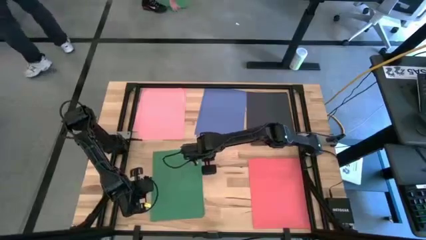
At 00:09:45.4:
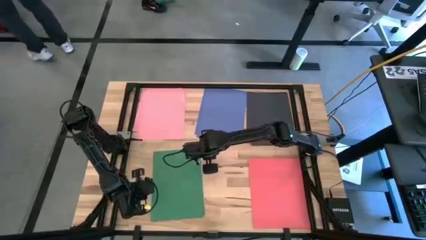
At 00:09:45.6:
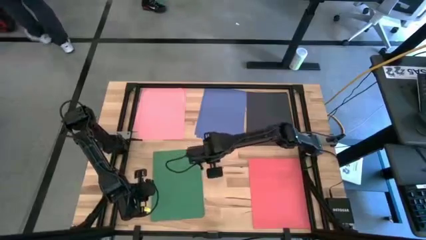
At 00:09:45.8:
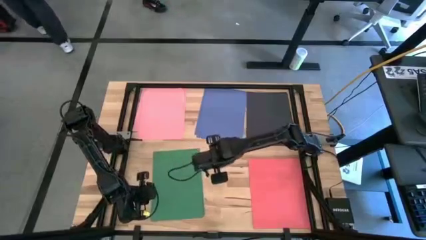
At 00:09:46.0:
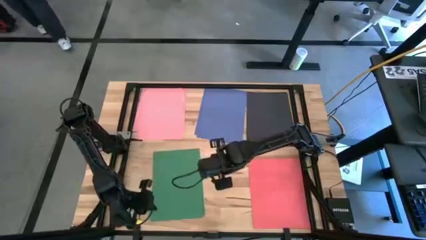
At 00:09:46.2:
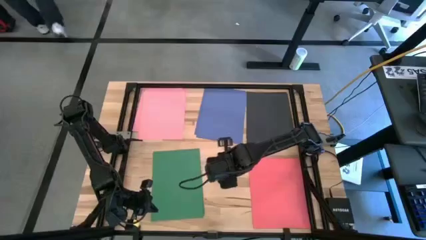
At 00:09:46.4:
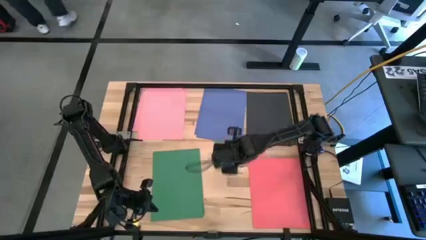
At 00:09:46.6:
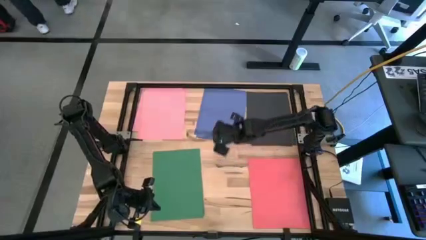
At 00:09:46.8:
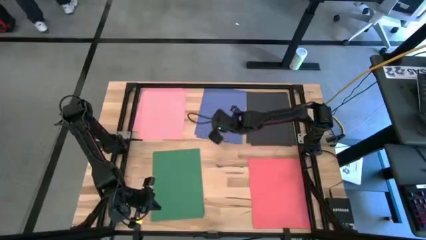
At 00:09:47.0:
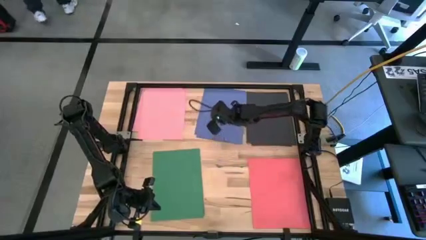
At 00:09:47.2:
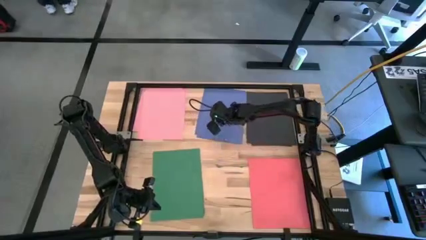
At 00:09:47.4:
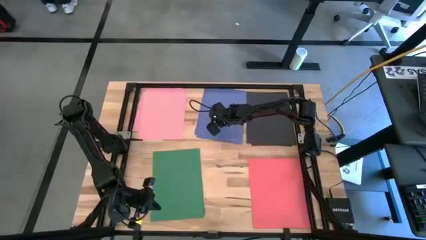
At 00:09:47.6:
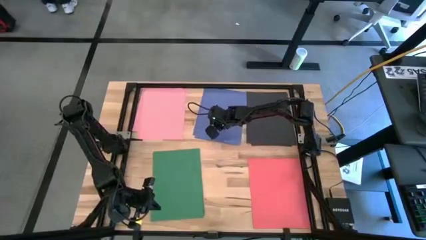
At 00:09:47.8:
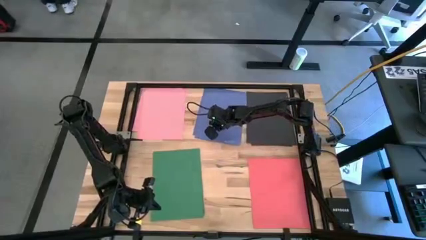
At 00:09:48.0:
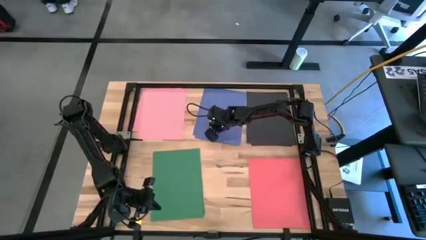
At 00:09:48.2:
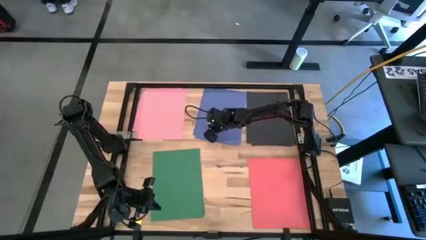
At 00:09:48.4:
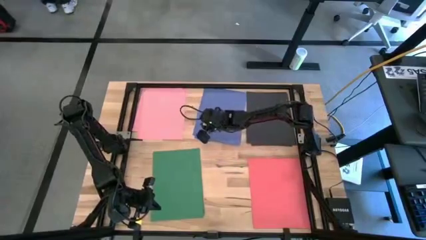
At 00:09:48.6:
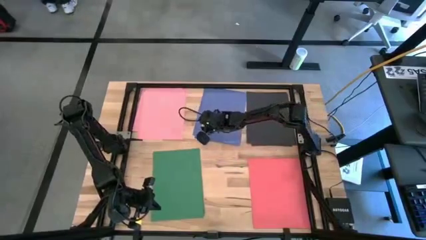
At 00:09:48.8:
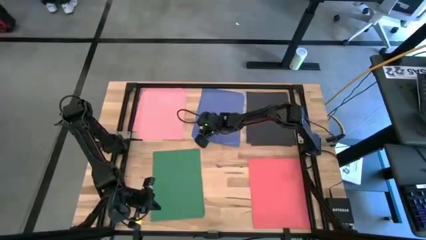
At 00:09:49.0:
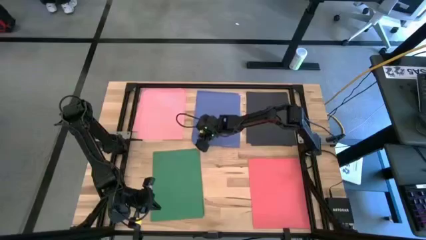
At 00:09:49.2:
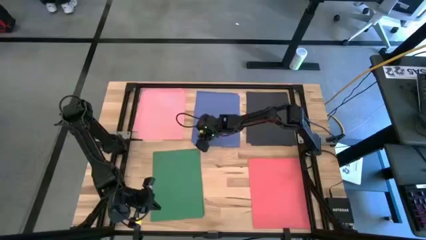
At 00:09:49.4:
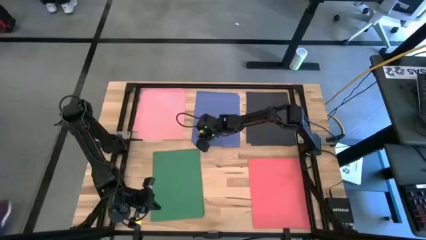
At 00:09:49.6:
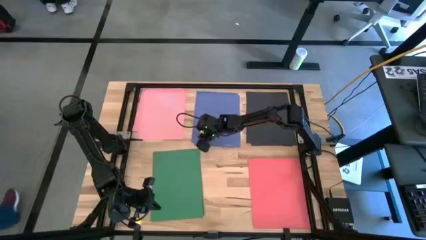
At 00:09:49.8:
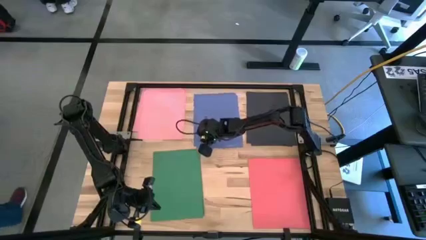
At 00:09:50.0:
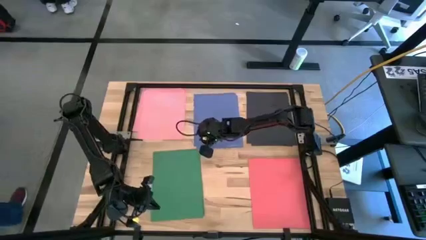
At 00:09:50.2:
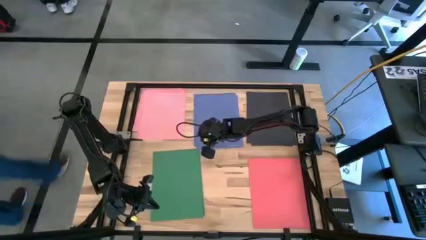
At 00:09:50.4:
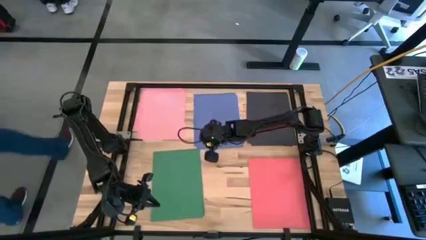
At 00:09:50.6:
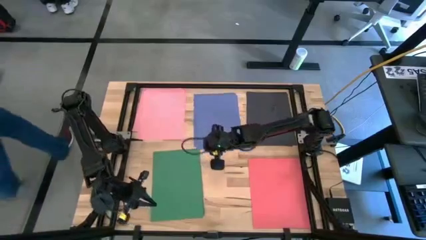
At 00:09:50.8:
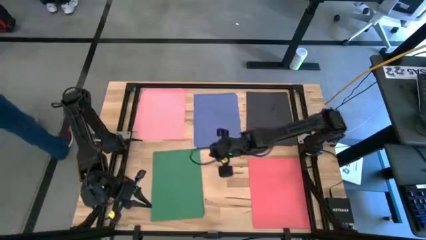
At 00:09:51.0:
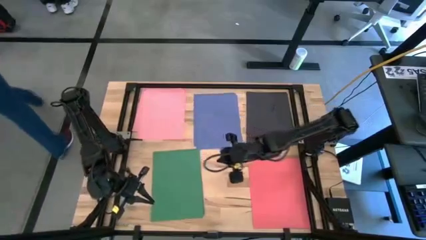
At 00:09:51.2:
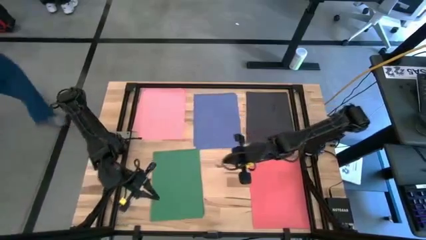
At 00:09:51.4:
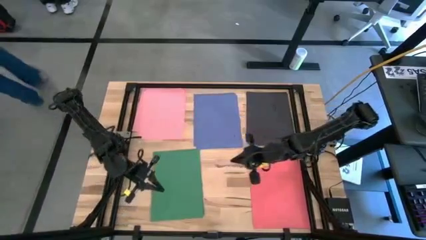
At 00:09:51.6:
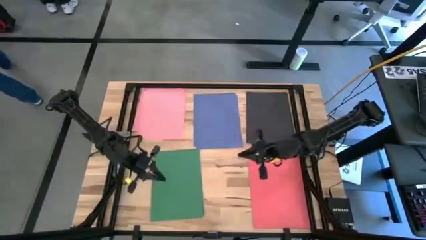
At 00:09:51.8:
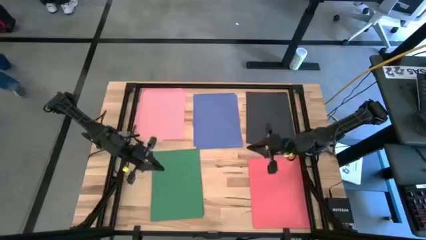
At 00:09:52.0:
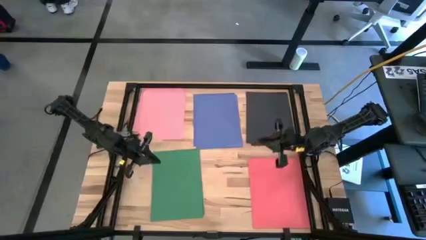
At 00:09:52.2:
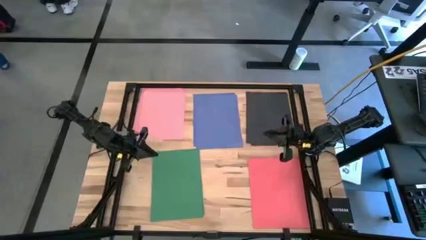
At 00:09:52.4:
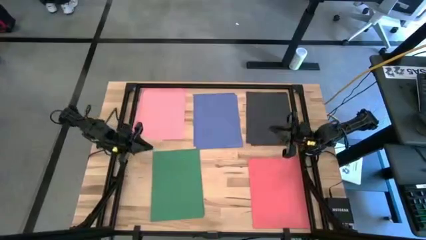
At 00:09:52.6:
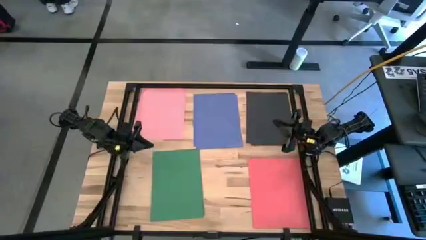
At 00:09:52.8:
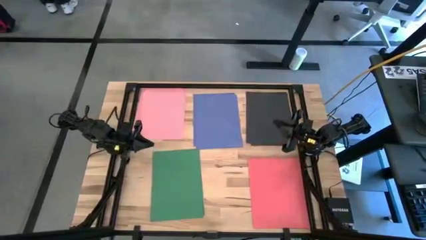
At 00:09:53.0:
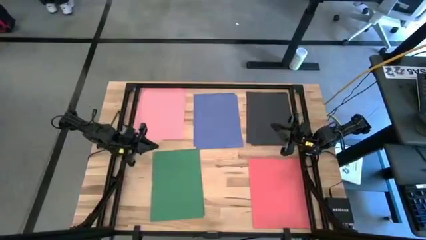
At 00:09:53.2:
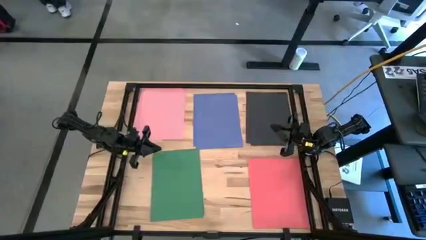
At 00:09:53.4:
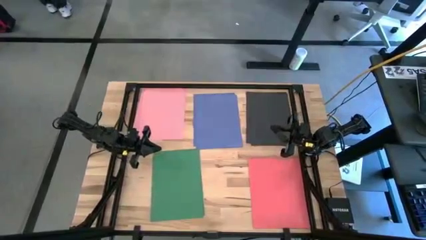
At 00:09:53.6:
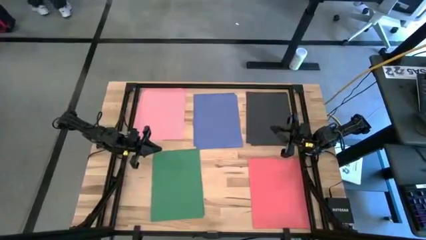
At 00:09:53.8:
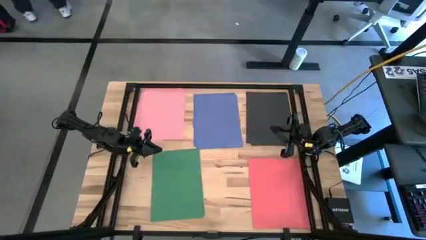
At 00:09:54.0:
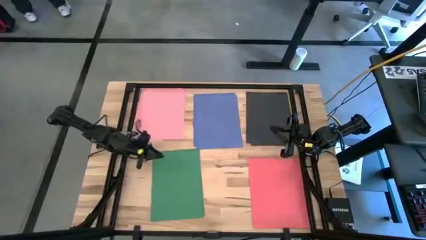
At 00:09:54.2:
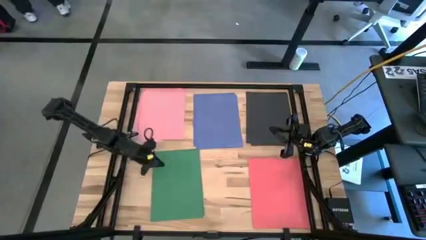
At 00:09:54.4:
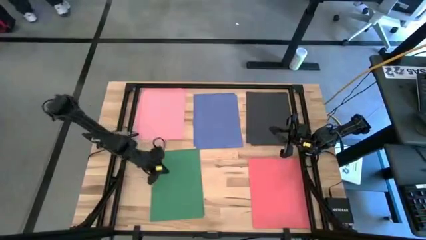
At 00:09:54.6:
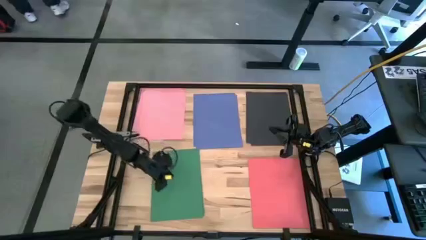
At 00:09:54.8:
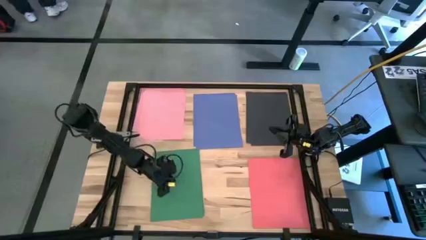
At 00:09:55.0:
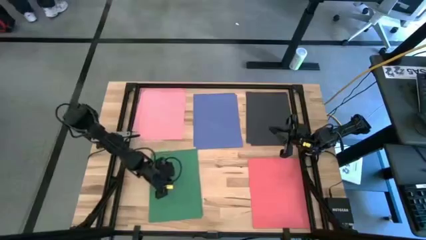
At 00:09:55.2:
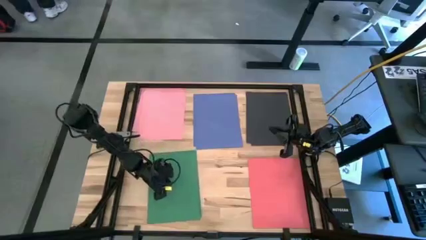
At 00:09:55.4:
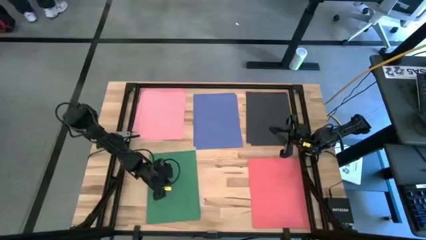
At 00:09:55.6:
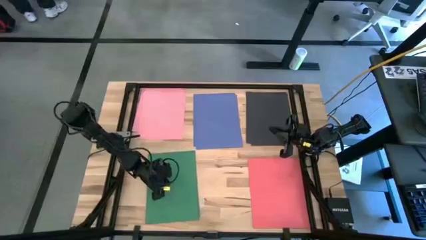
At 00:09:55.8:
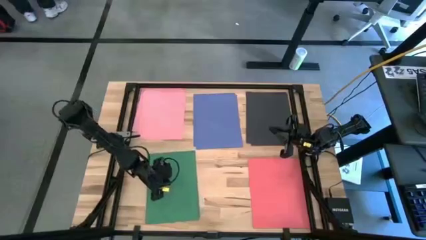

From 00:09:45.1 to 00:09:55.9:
Task: Organize paper
Adjust the papers on the table

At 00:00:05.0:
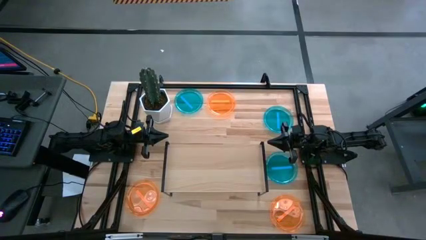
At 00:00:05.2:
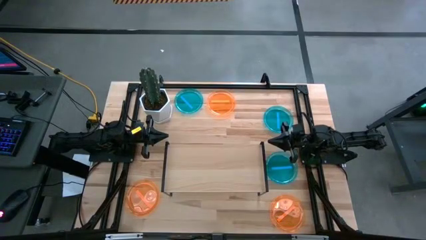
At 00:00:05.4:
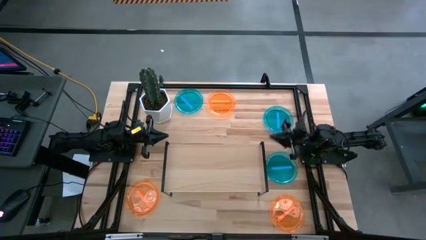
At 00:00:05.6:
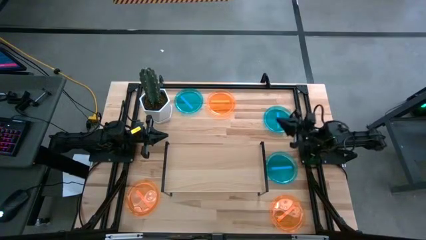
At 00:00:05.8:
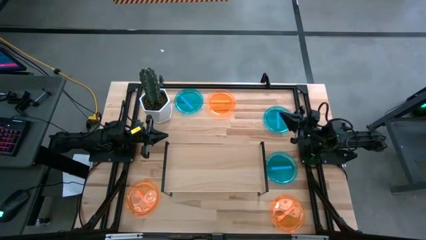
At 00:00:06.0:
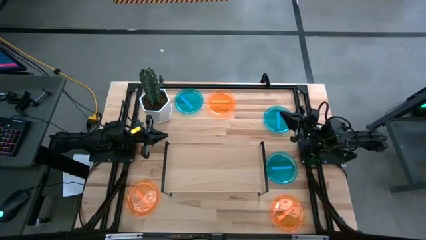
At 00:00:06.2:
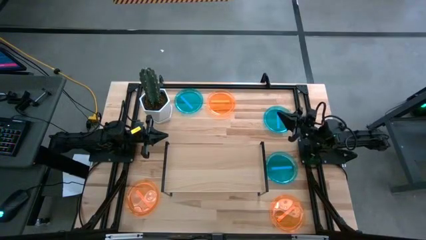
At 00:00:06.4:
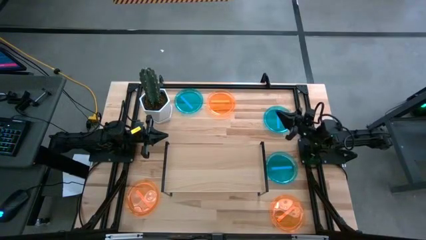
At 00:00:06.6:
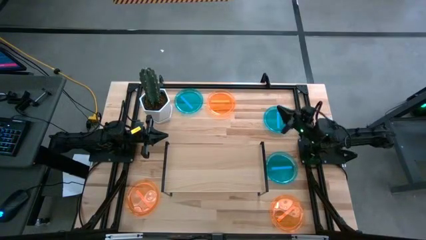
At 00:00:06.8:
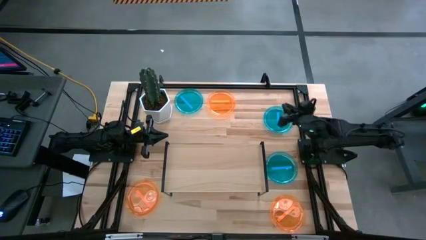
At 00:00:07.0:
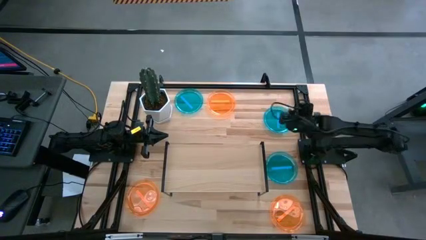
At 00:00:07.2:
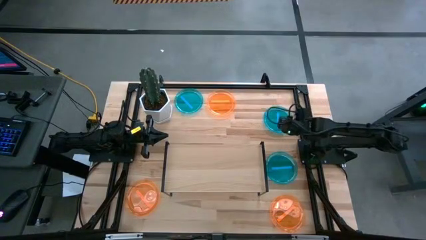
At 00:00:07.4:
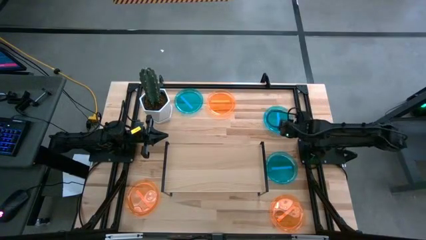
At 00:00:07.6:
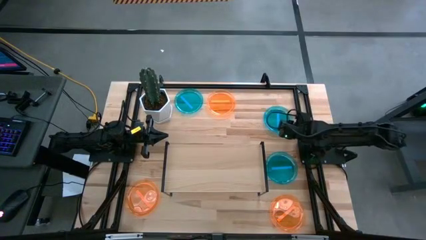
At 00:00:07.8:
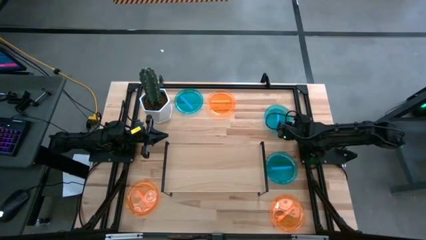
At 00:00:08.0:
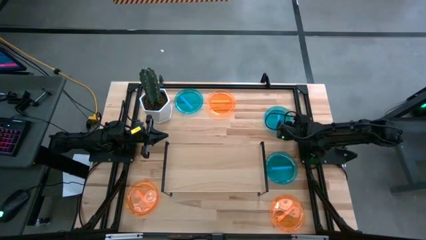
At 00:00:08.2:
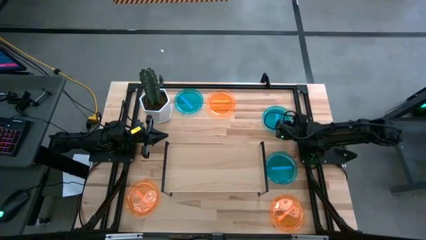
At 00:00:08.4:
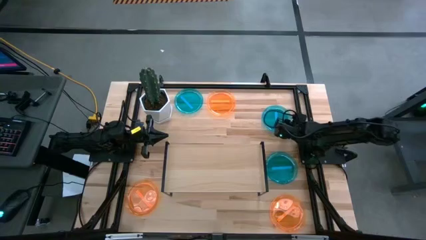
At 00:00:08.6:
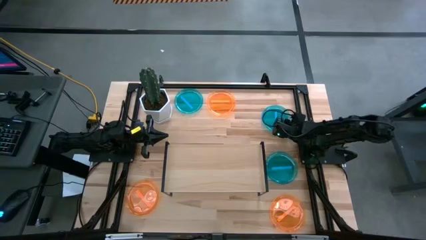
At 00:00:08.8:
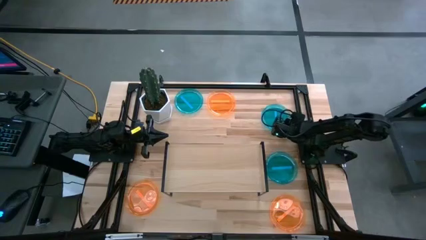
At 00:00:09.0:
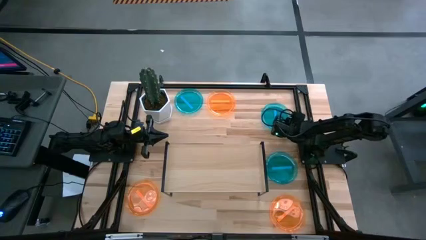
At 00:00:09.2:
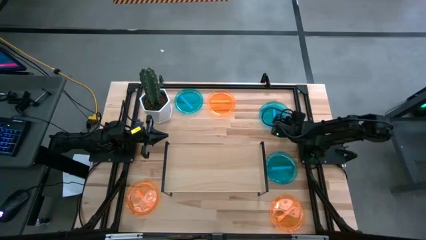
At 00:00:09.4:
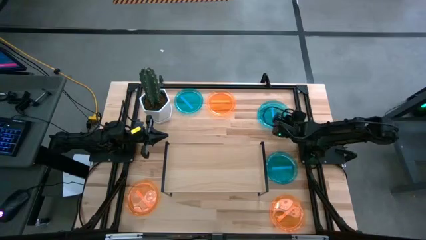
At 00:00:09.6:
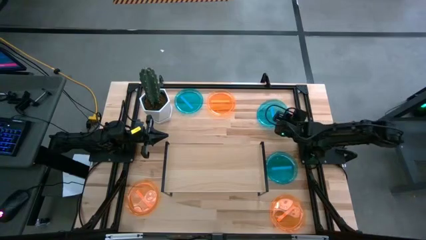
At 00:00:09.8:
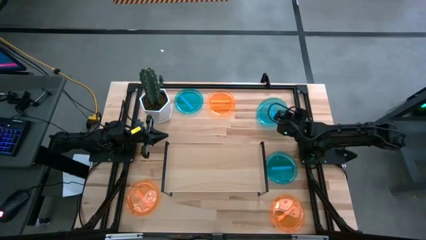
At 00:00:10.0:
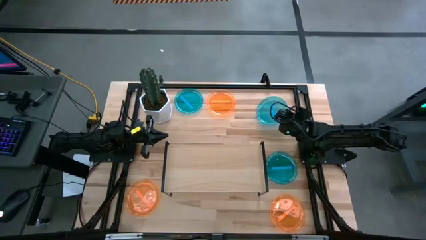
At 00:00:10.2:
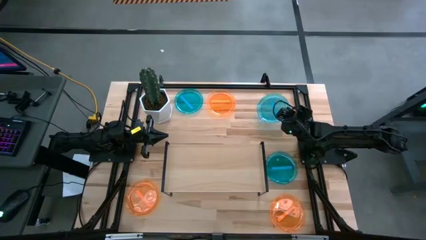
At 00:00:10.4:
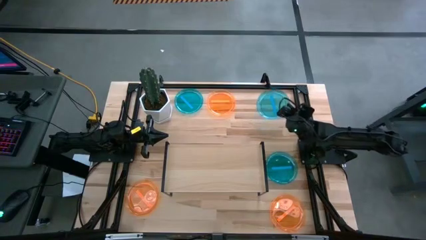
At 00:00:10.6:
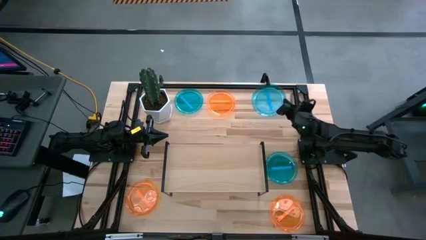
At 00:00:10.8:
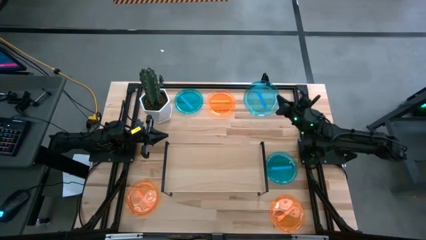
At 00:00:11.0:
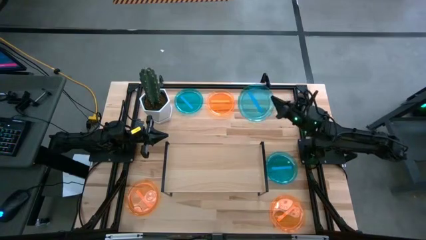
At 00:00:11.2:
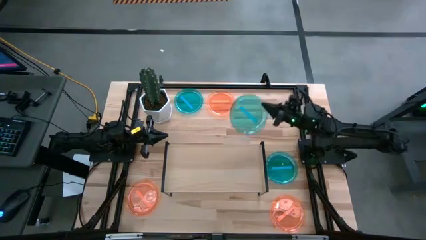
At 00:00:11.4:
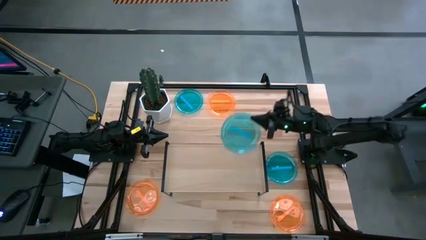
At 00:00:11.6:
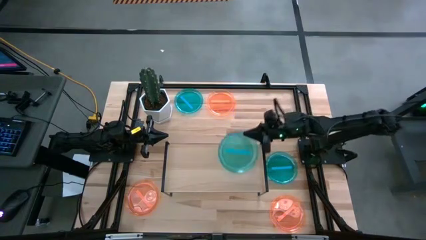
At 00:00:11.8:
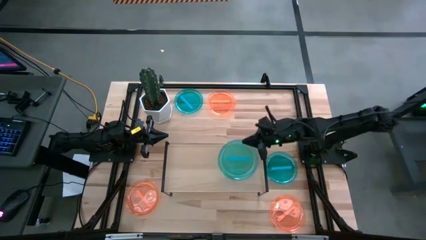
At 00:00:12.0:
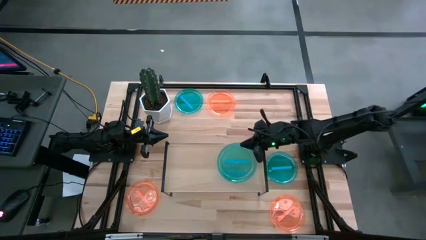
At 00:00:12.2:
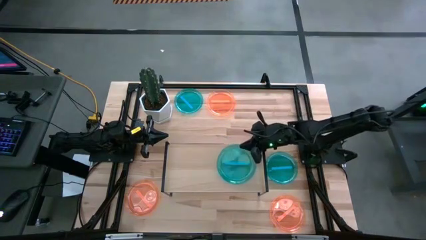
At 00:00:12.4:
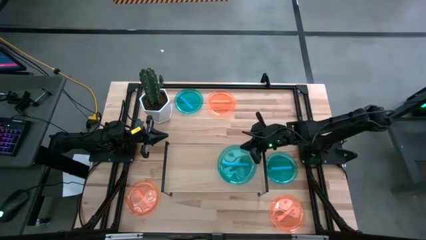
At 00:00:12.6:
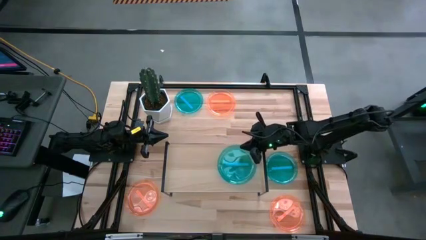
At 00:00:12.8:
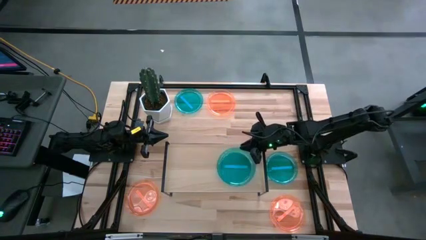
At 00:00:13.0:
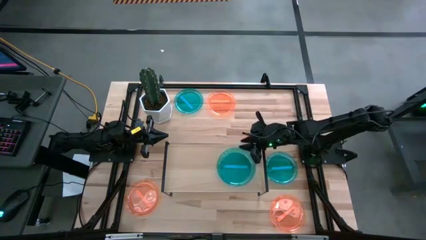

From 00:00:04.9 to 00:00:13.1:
Task: Place and stack plates onto a shelf
Put the top right blue transparent plate on the shelf
